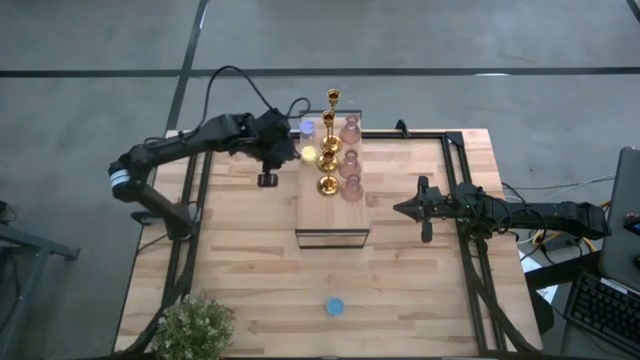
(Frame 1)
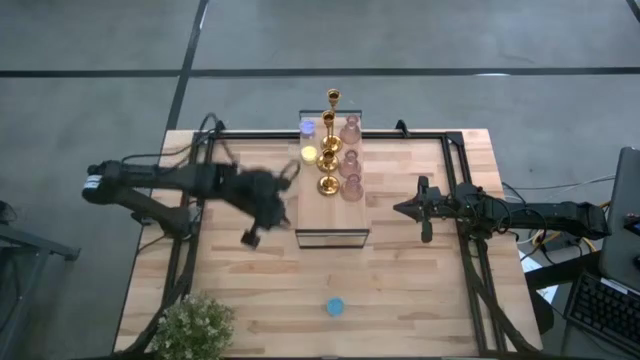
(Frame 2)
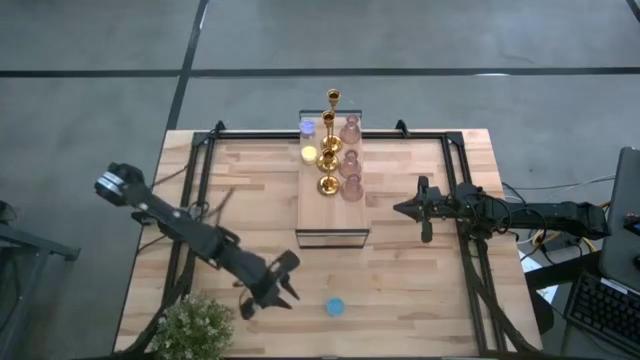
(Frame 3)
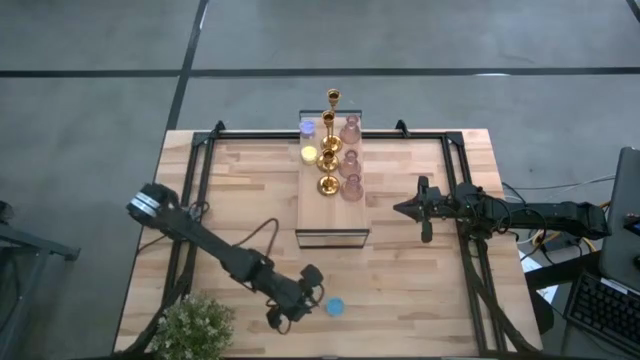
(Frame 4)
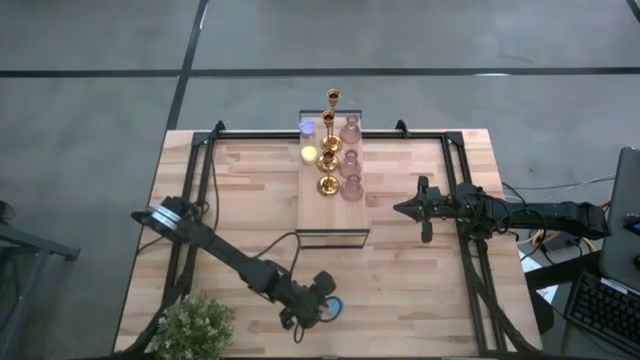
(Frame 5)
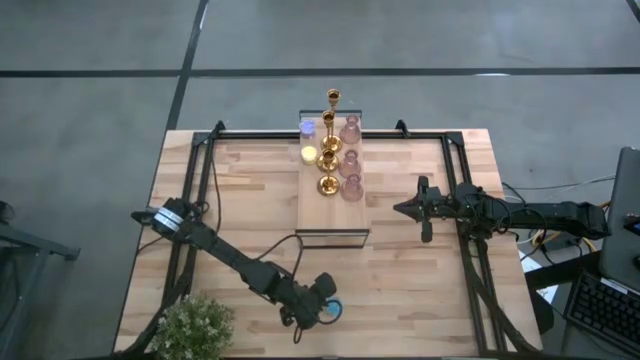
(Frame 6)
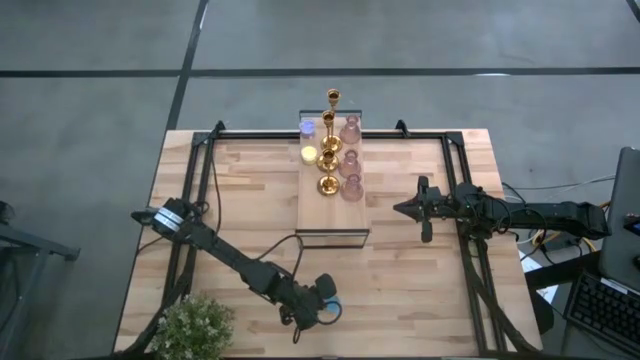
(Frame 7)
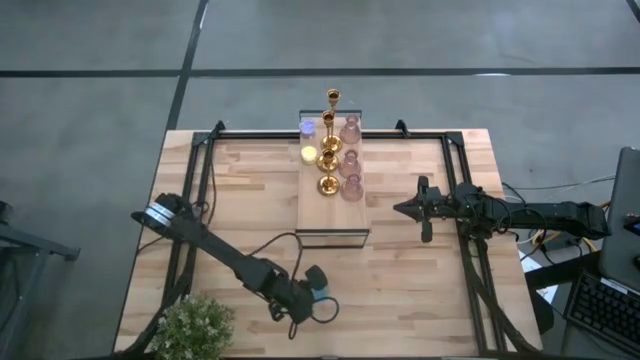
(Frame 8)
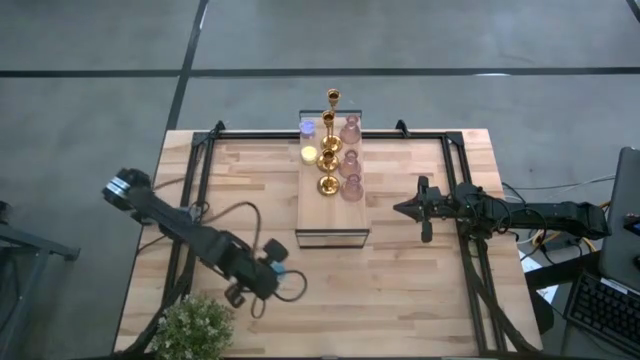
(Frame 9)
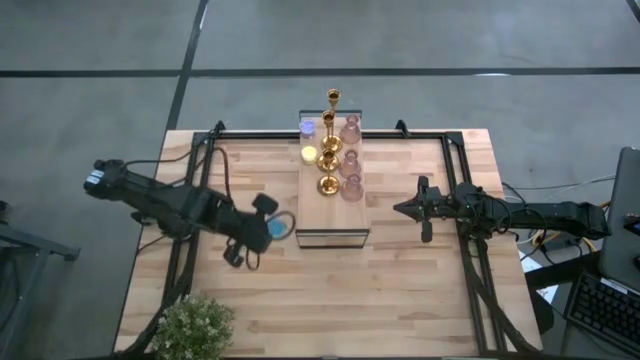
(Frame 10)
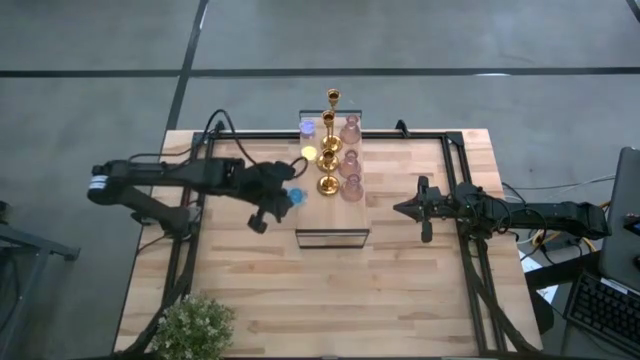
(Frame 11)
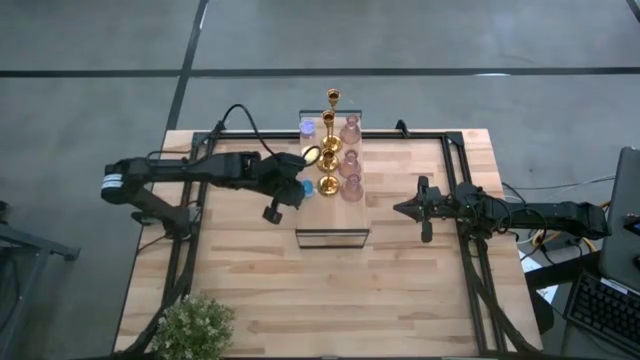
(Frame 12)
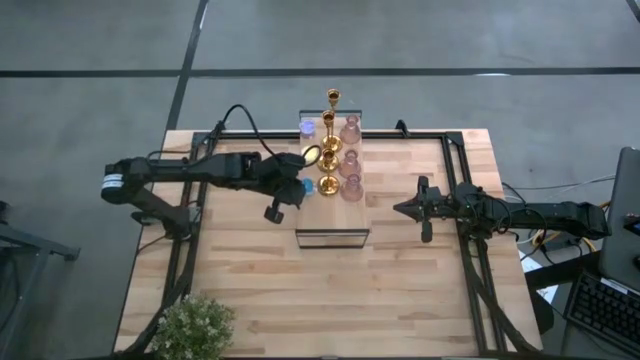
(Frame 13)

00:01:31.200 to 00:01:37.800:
Task: Pick & Place candle stick holders
Put the blue scented candle on the shelf

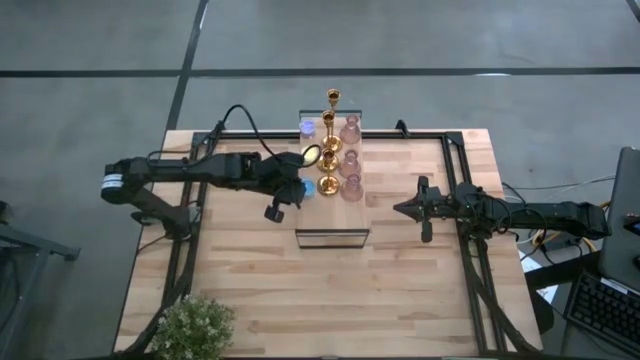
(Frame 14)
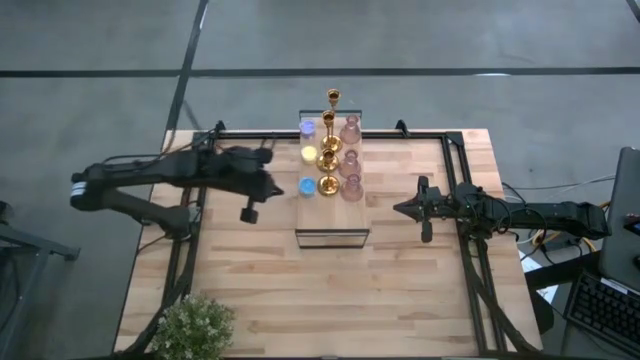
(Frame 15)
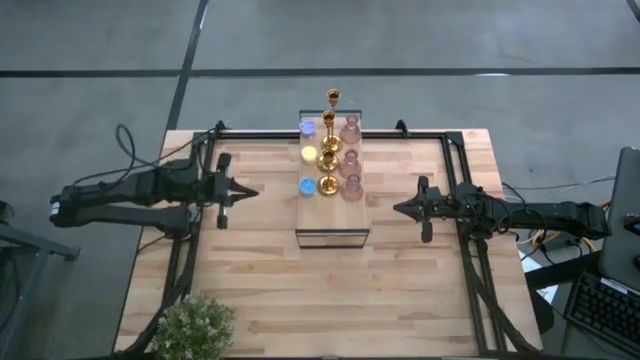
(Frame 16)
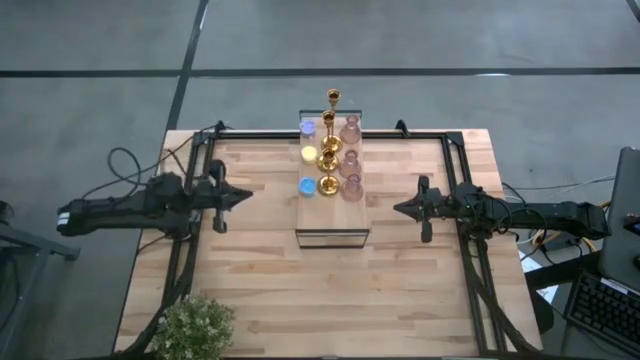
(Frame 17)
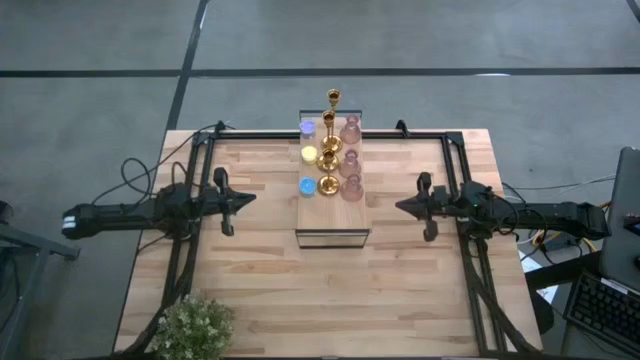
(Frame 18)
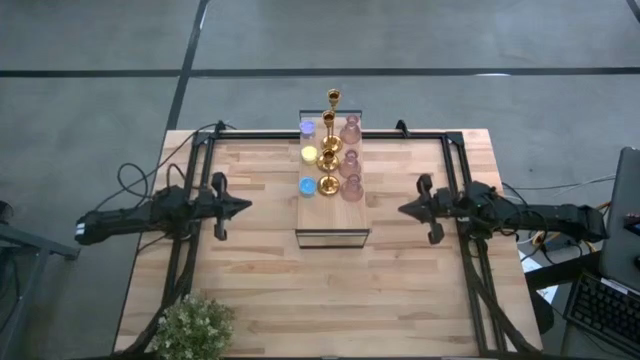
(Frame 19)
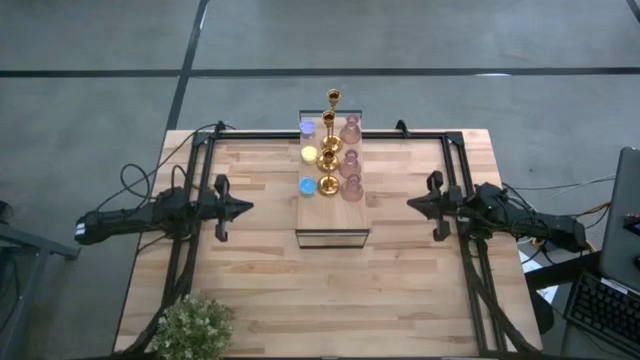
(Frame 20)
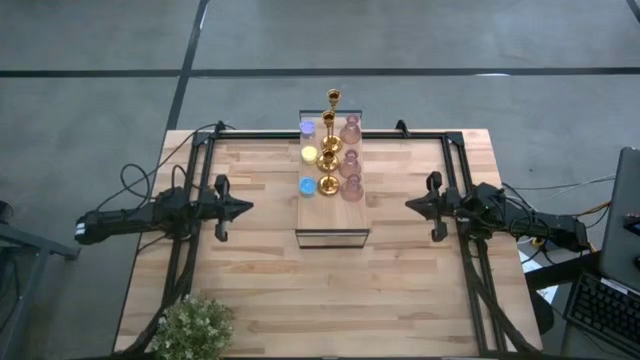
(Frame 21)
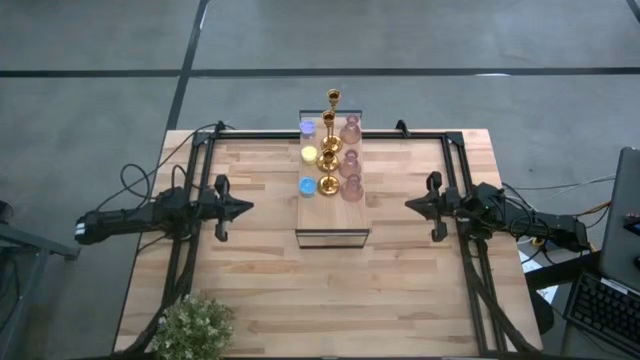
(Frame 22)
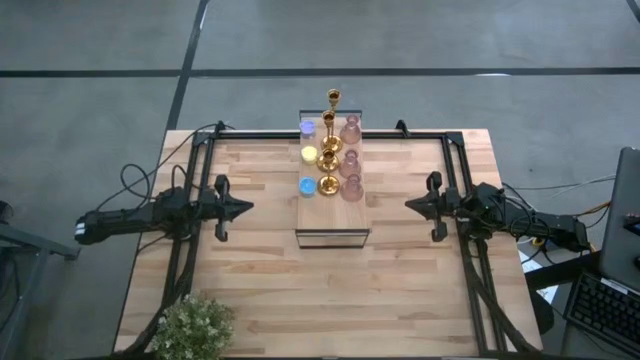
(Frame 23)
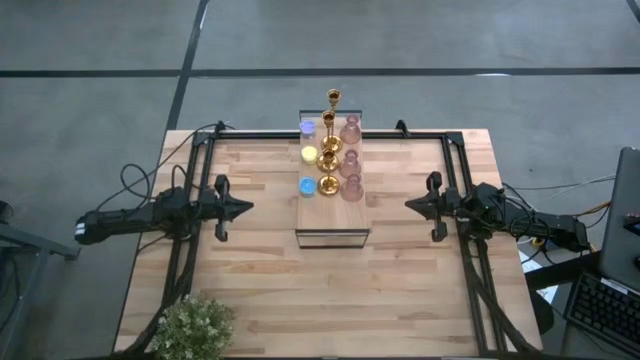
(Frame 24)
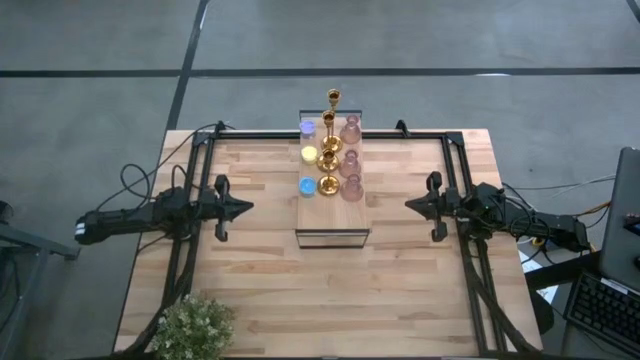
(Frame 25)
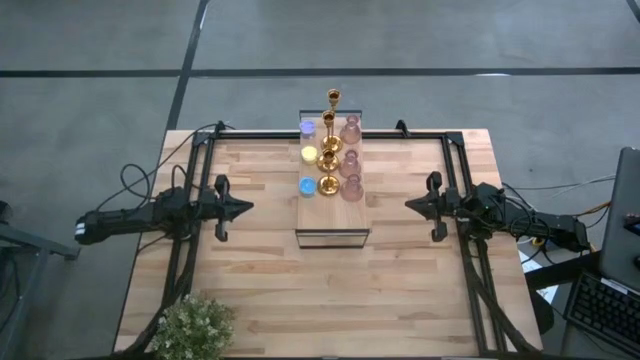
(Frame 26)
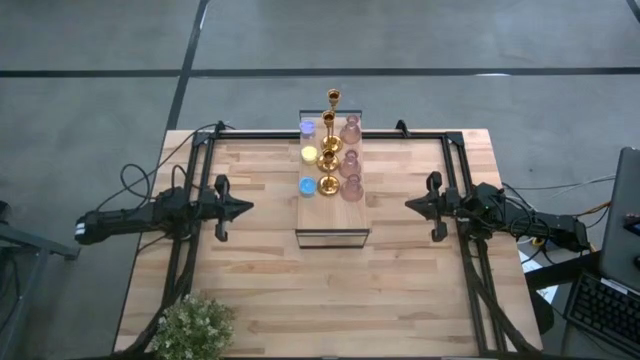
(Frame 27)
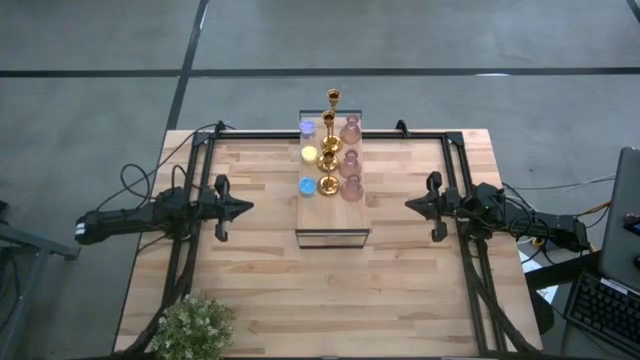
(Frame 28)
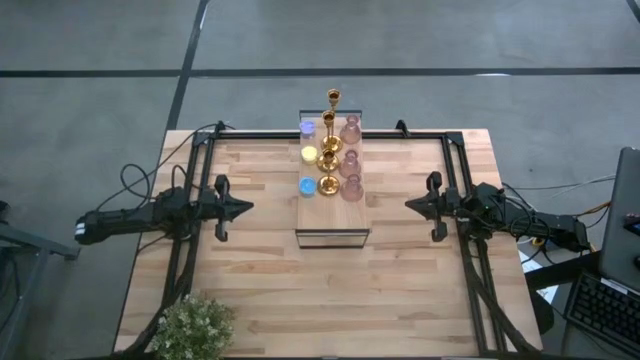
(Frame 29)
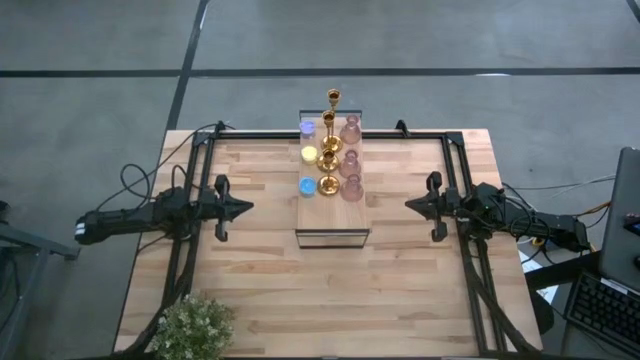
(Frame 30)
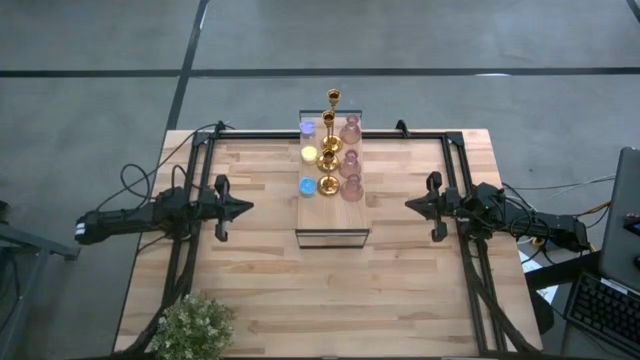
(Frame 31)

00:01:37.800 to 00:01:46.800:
Return to Home Position
